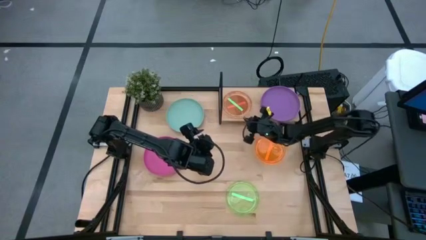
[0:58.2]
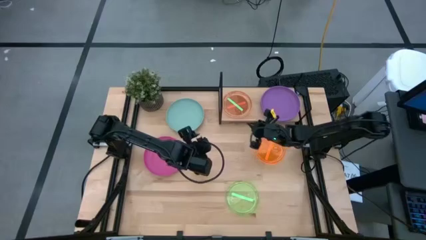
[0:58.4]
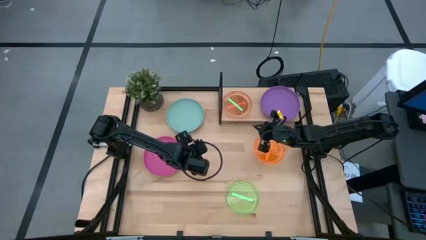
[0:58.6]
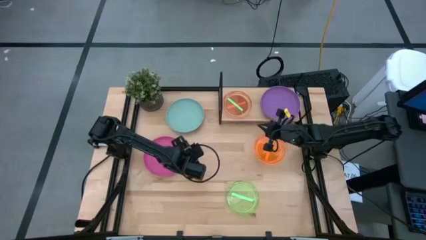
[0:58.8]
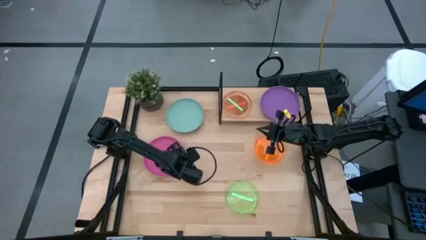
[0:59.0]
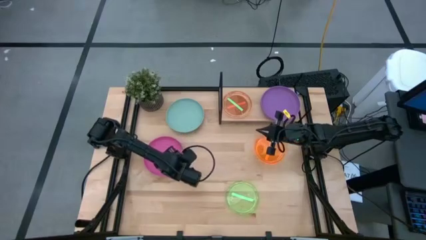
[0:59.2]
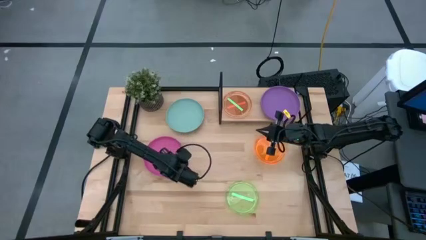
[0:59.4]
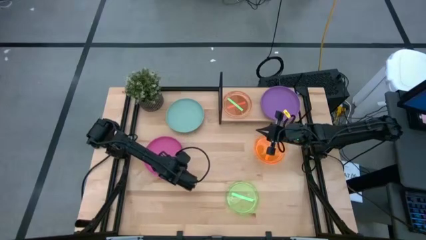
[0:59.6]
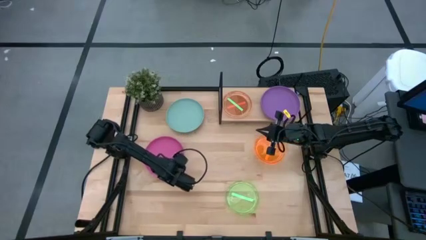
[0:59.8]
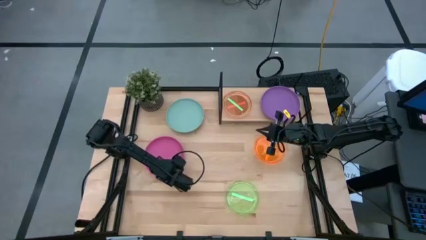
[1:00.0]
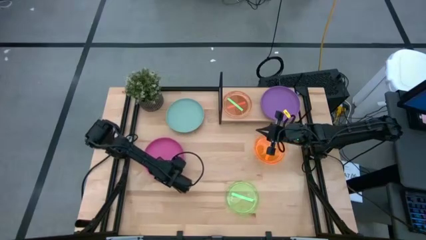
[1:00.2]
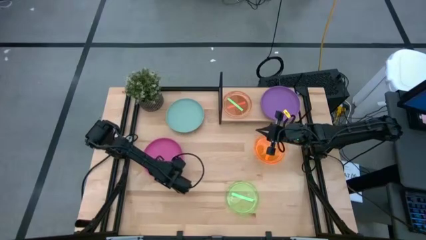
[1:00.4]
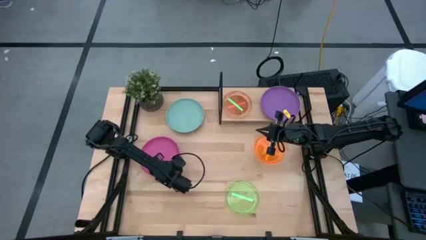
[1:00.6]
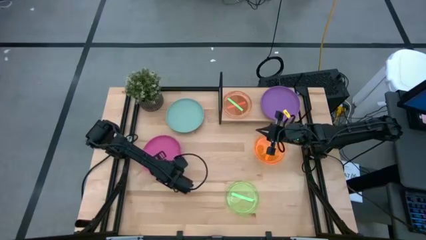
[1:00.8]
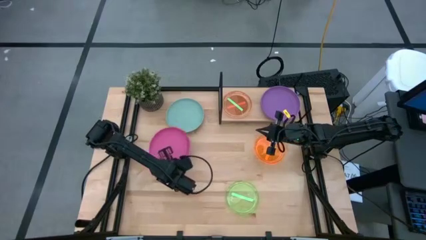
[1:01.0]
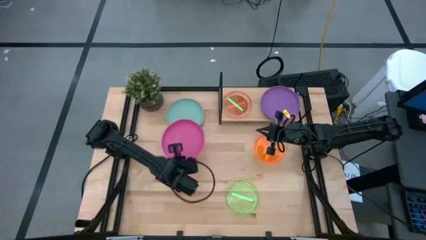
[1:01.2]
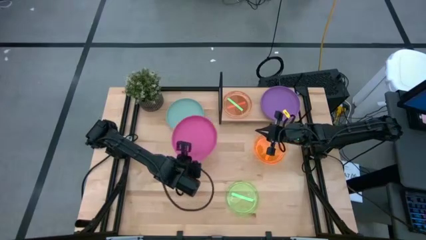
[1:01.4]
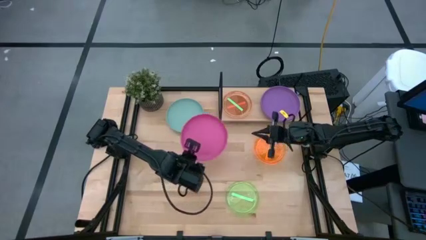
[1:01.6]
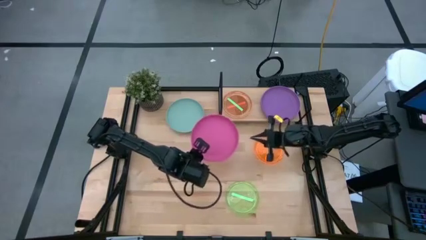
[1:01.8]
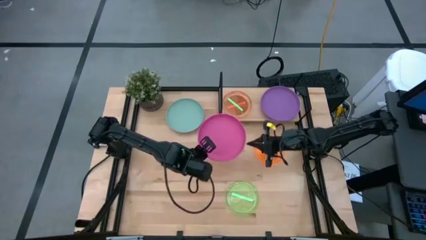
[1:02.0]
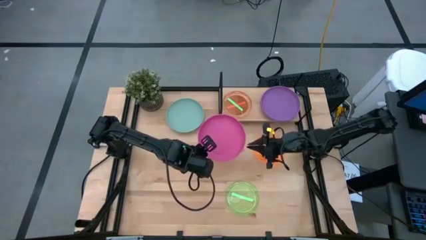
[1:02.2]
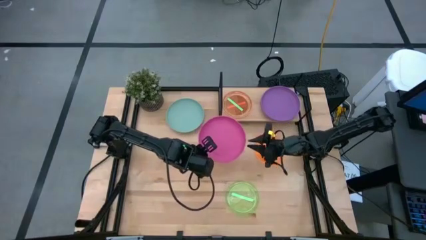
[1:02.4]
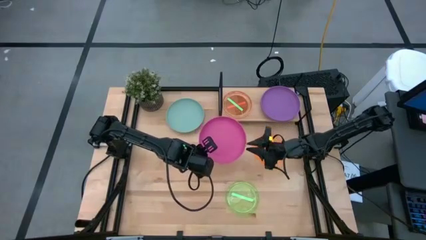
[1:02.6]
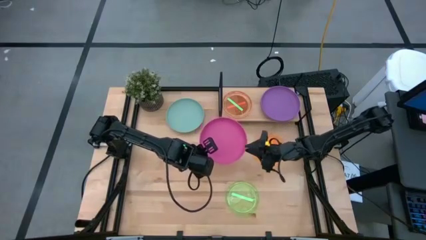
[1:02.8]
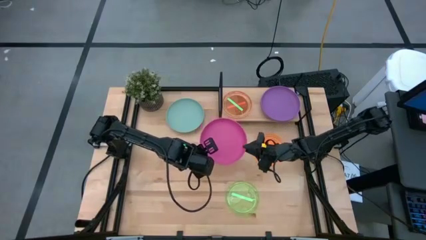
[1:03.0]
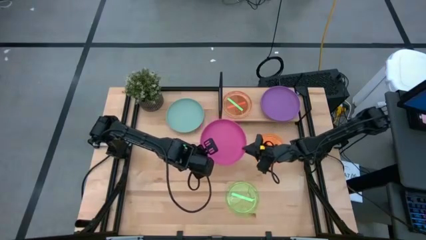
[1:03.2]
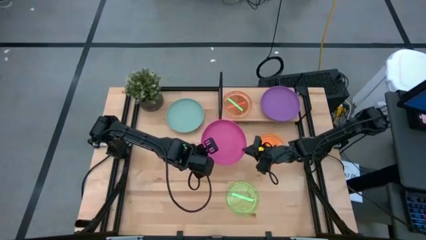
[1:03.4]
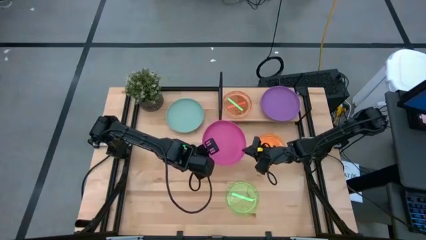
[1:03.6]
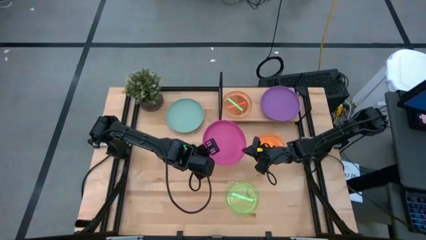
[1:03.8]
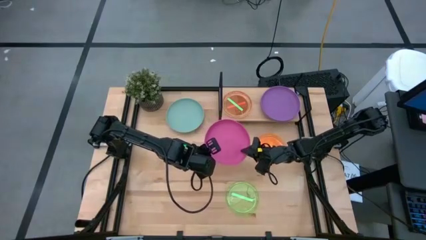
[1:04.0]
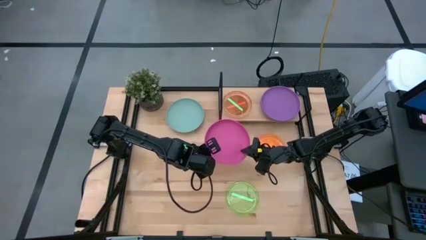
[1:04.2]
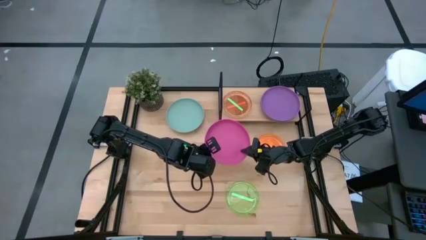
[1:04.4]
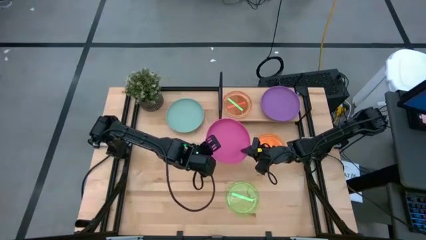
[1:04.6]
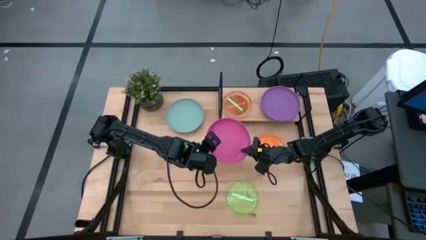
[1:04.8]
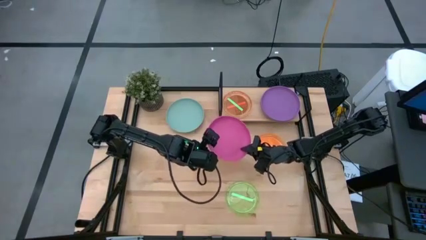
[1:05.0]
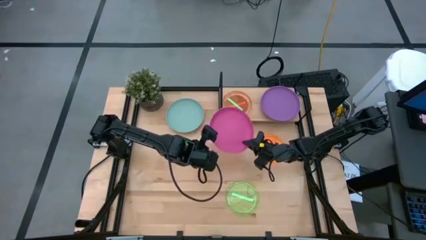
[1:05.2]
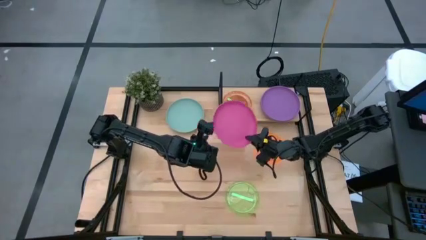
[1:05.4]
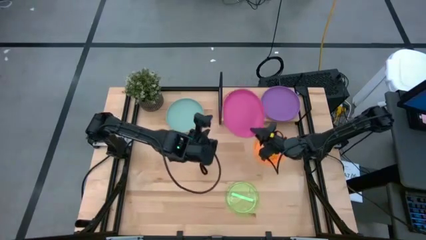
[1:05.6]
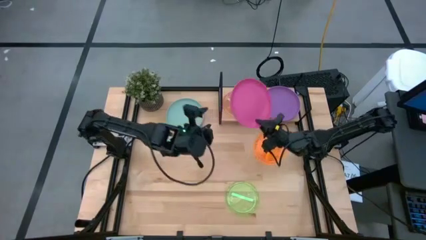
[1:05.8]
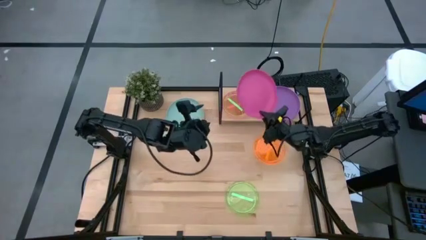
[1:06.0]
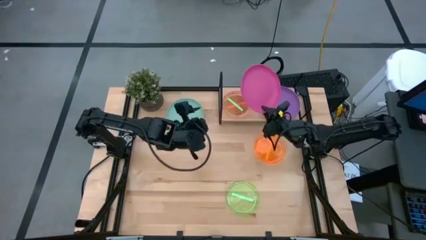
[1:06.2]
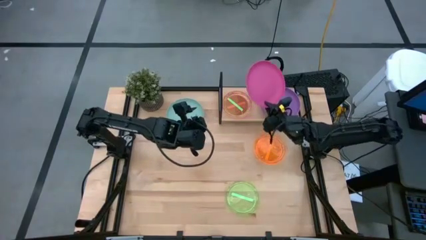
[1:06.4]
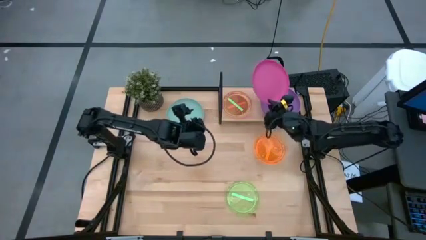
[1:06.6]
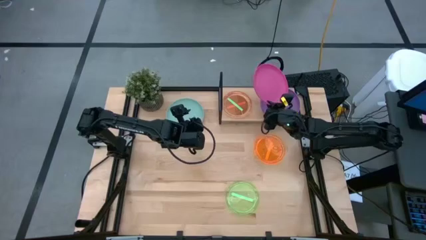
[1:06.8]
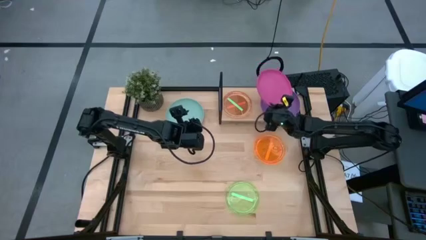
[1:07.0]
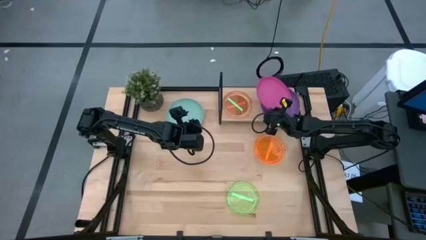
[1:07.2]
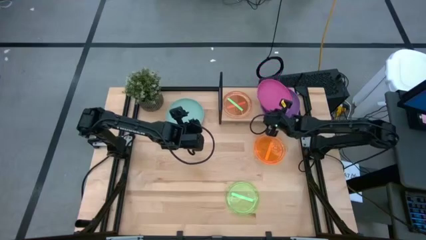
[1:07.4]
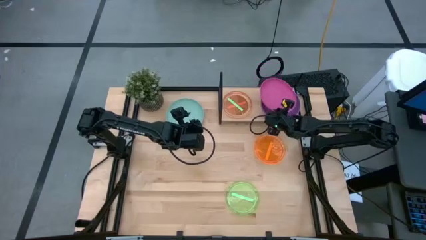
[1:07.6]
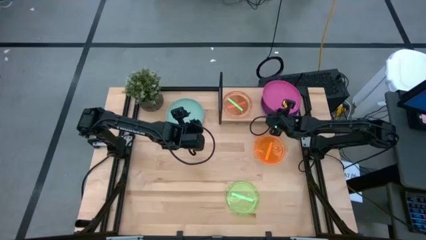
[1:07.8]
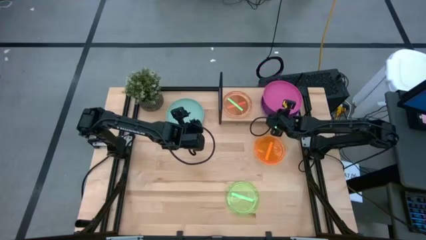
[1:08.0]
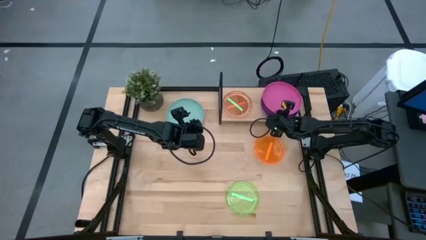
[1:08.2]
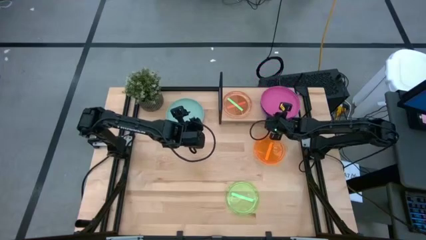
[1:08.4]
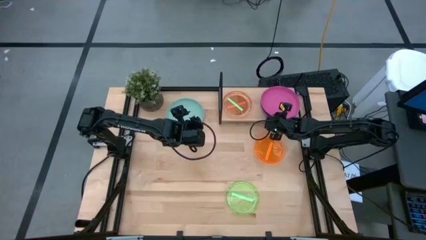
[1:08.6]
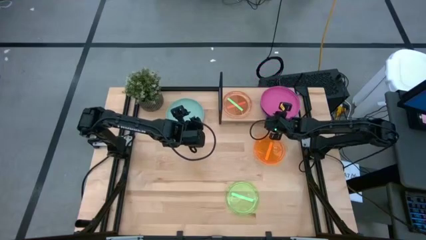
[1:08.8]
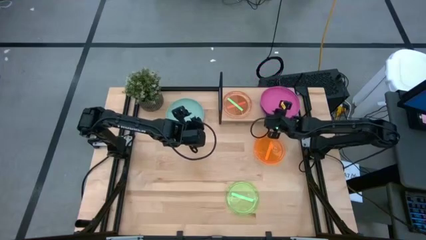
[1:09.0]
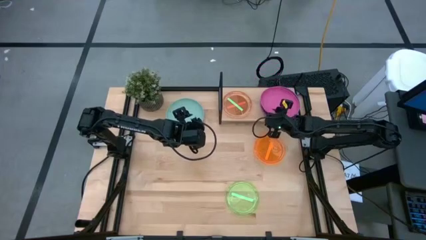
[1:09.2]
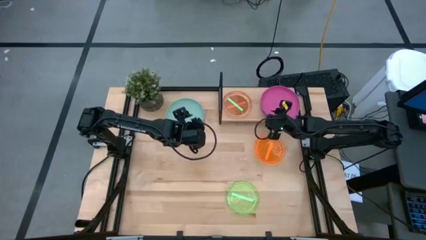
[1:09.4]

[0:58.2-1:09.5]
Task: Place and stack plates onto a shelf
Stack the big pink plate on top of the big violet plate

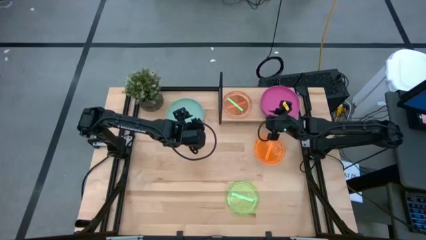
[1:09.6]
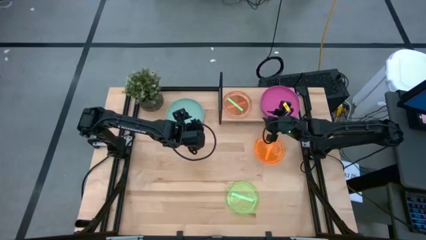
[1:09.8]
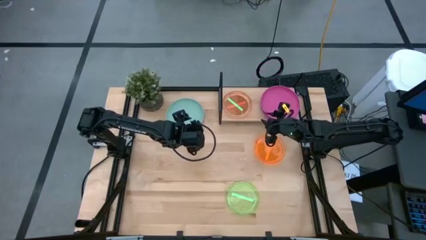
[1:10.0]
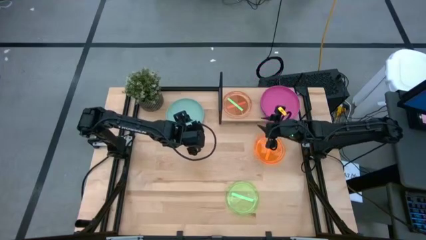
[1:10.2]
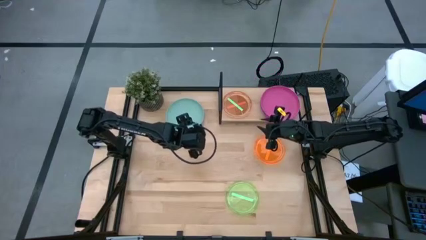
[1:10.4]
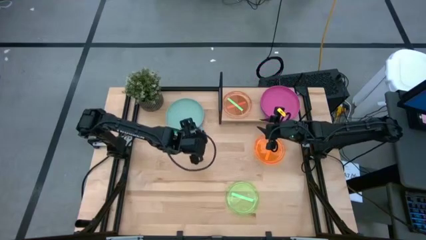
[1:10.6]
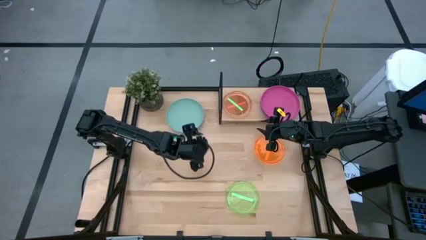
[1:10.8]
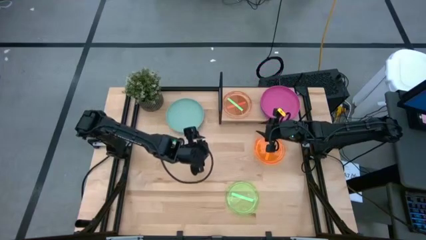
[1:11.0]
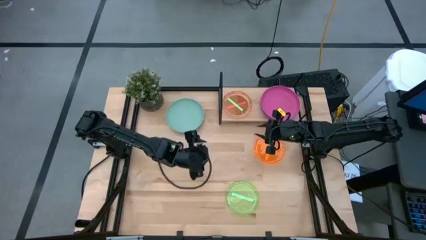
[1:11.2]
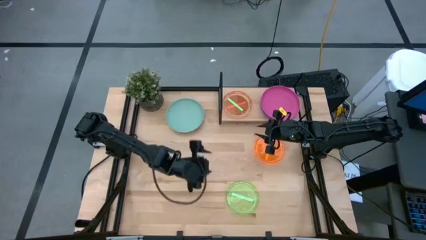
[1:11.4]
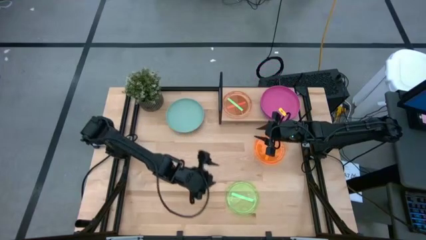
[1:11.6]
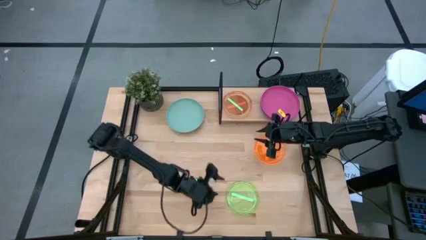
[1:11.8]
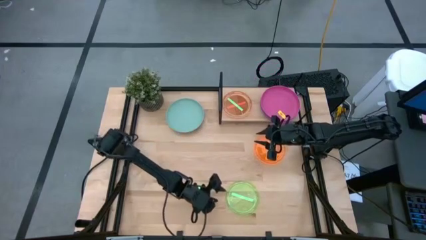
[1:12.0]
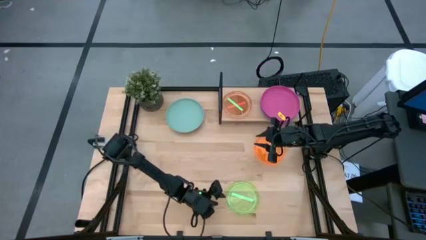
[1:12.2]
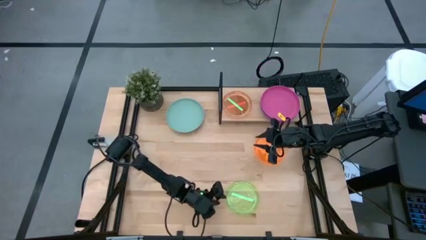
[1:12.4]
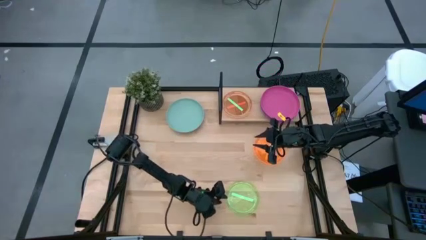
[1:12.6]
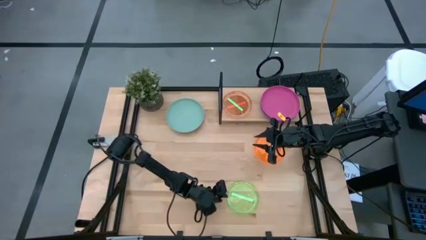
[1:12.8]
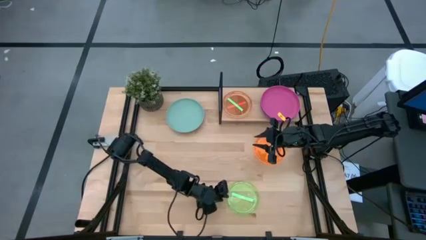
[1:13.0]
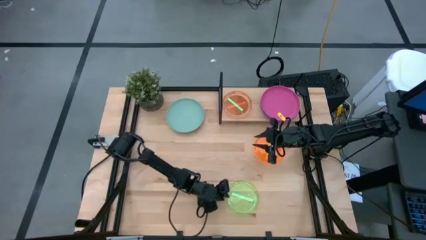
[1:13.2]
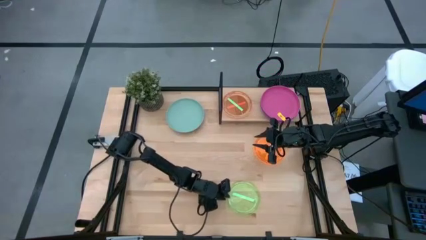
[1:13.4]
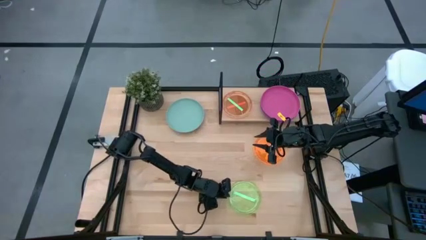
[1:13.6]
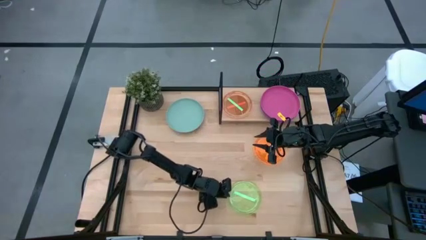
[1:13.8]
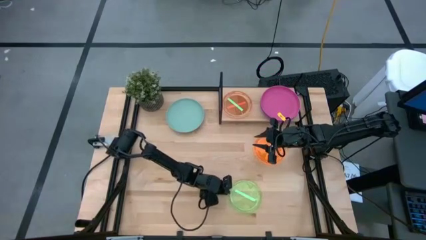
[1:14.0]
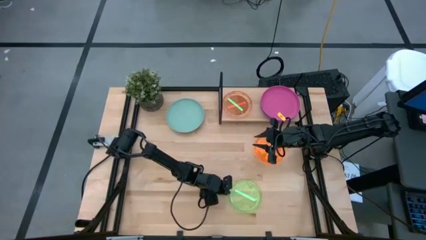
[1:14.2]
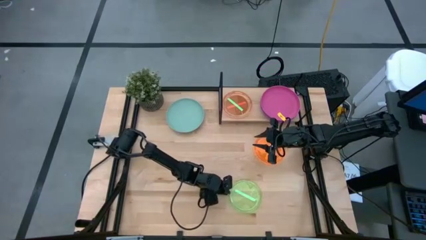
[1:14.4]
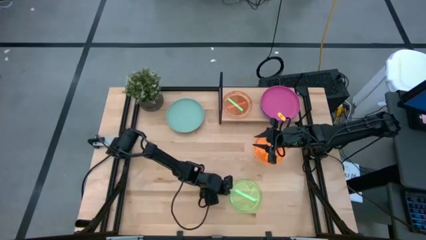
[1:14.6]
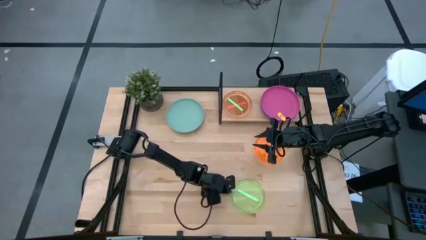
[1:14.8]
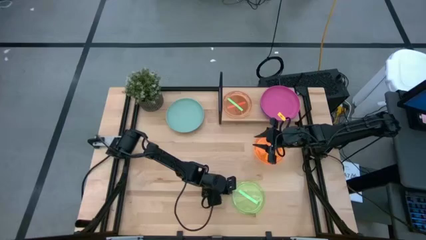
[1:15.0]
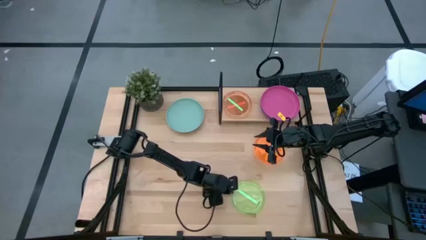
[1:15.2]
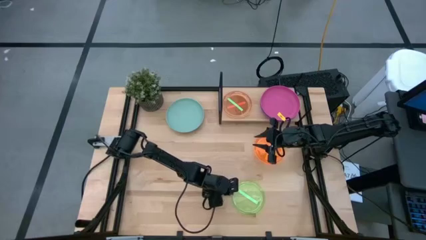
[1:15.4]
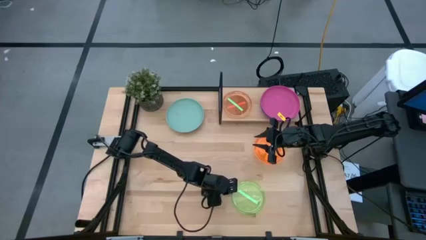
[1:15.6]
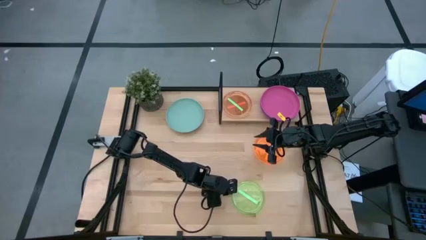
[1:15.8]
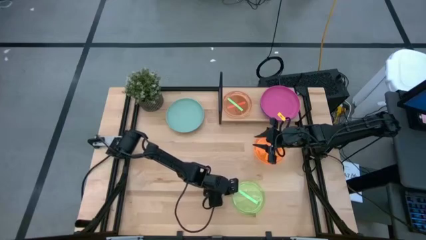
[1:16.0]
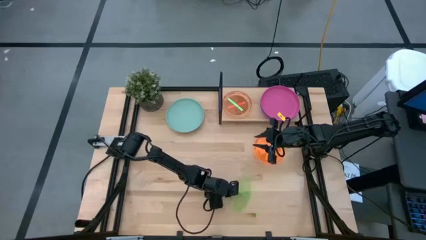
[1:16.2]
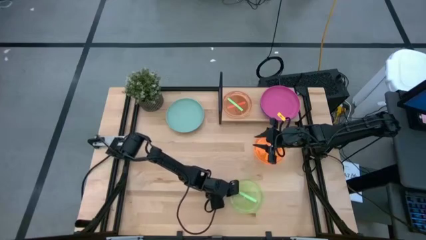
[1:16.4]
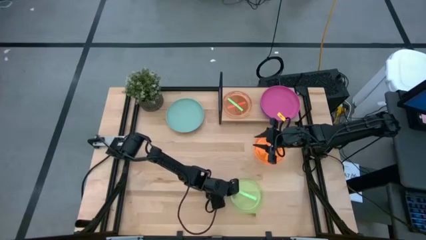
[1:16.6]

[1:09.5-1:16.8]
Stack the small green plate on top of the small green plate
